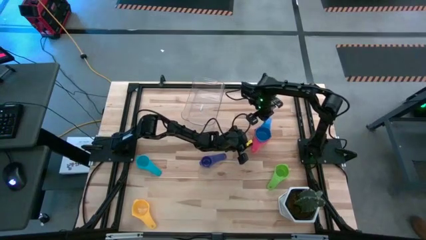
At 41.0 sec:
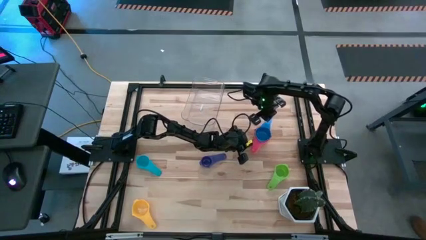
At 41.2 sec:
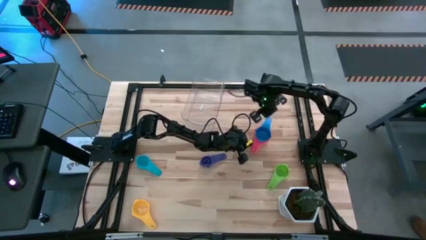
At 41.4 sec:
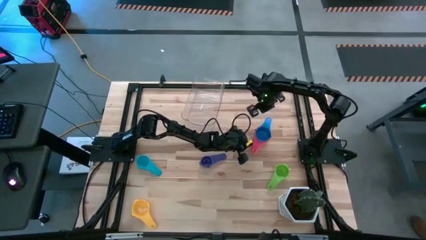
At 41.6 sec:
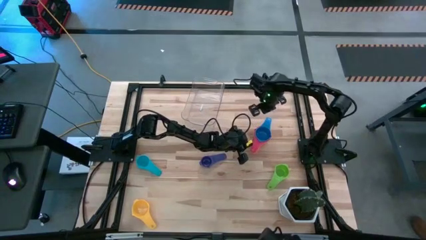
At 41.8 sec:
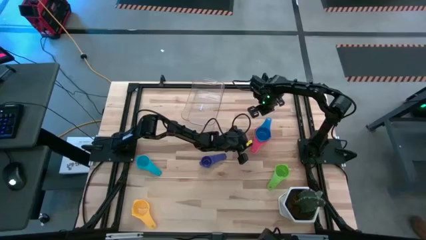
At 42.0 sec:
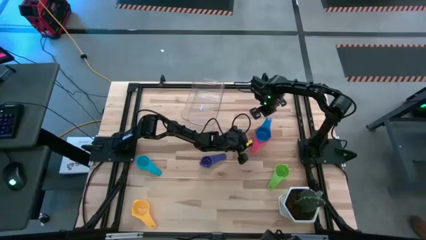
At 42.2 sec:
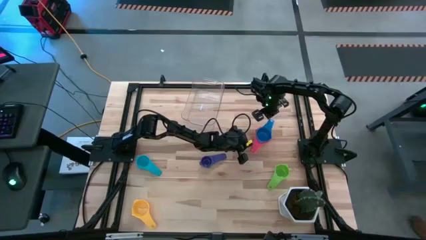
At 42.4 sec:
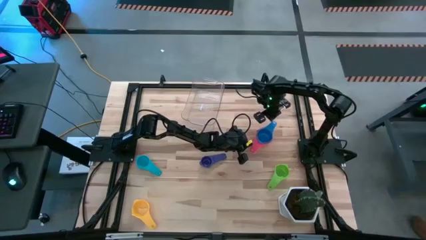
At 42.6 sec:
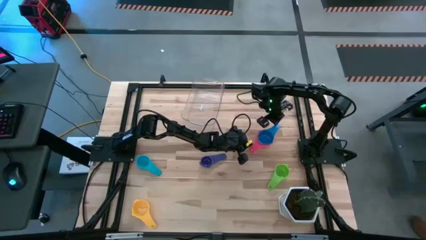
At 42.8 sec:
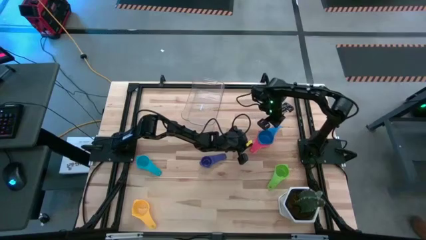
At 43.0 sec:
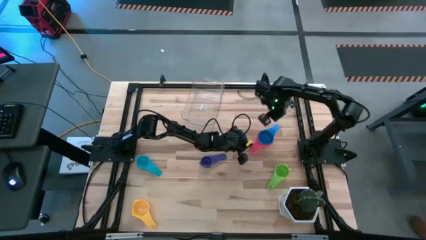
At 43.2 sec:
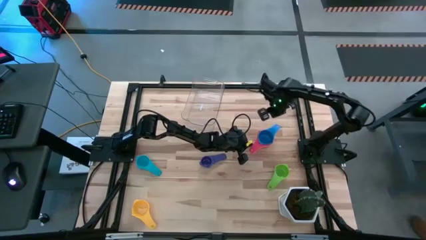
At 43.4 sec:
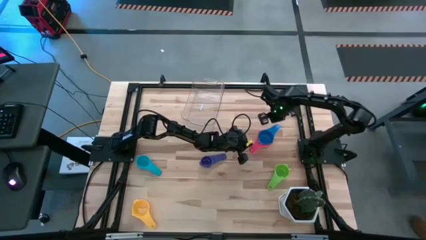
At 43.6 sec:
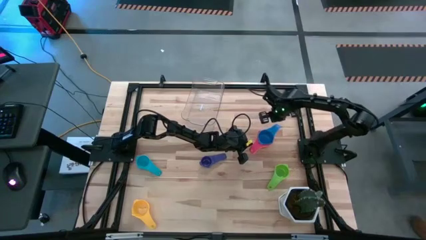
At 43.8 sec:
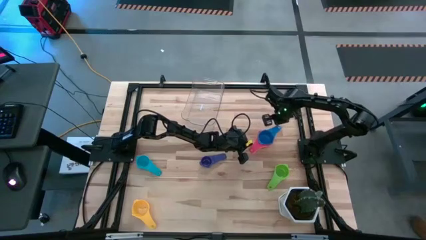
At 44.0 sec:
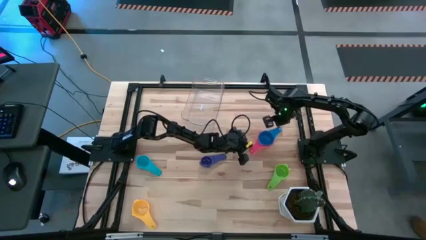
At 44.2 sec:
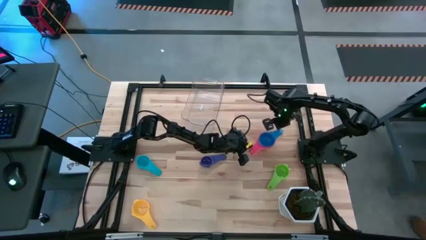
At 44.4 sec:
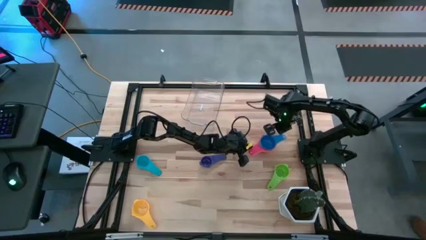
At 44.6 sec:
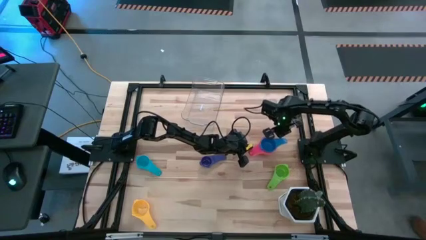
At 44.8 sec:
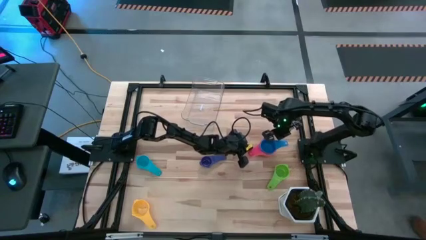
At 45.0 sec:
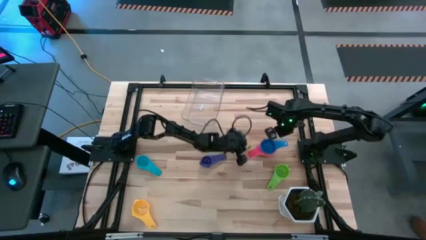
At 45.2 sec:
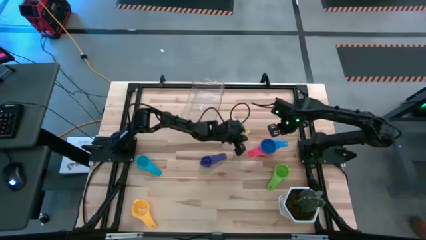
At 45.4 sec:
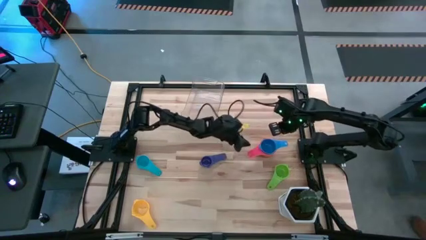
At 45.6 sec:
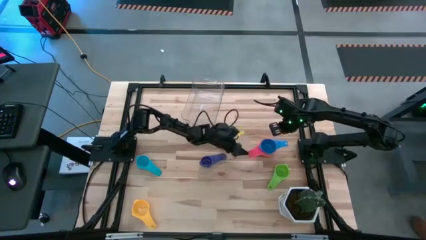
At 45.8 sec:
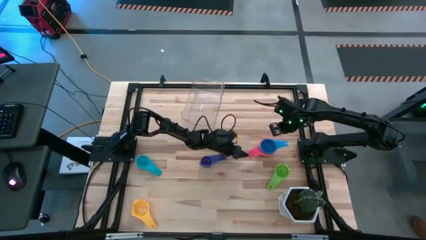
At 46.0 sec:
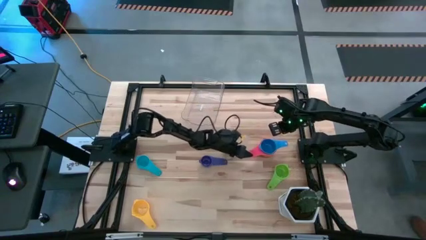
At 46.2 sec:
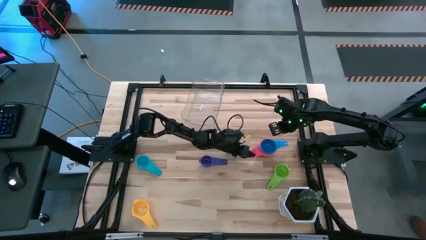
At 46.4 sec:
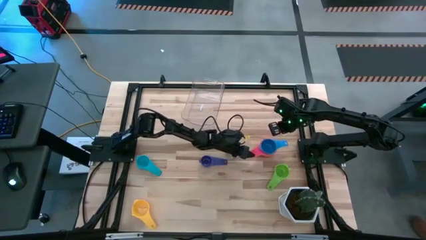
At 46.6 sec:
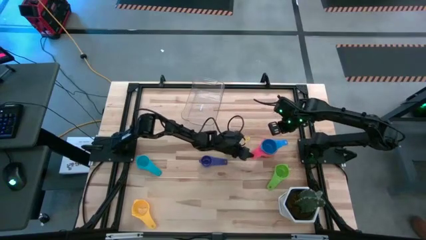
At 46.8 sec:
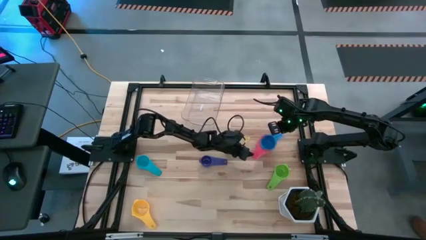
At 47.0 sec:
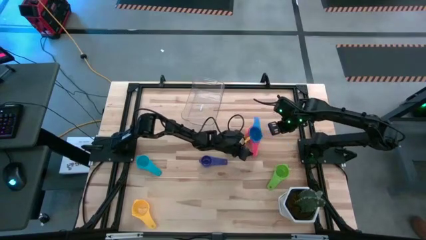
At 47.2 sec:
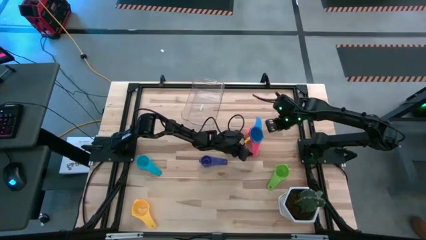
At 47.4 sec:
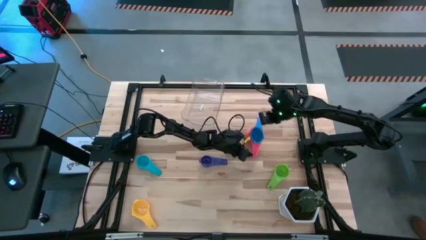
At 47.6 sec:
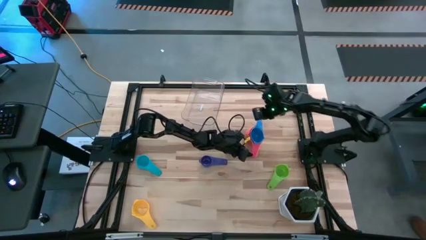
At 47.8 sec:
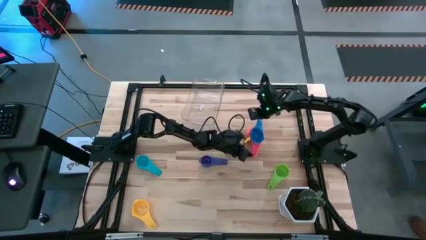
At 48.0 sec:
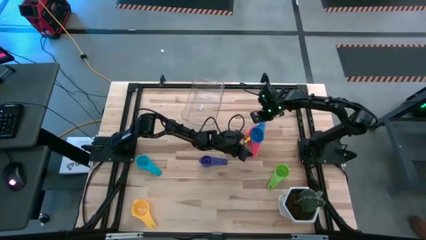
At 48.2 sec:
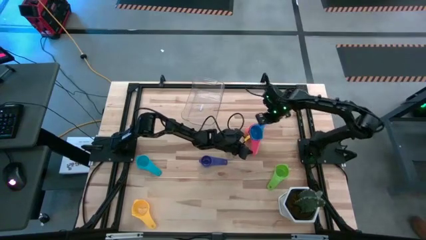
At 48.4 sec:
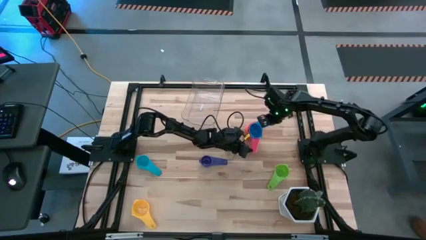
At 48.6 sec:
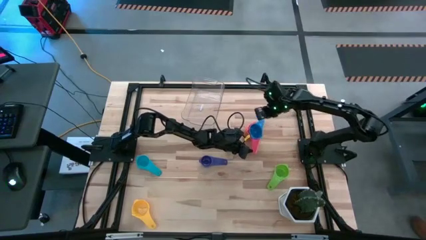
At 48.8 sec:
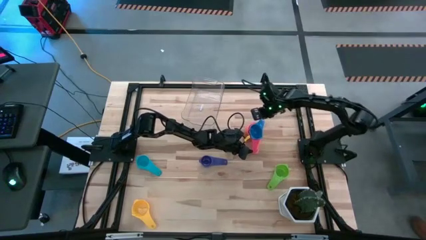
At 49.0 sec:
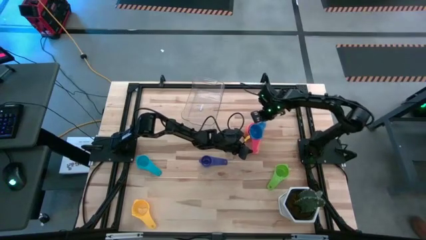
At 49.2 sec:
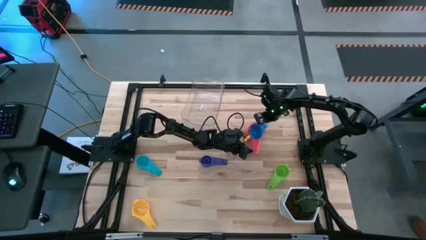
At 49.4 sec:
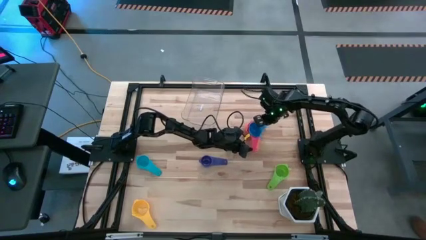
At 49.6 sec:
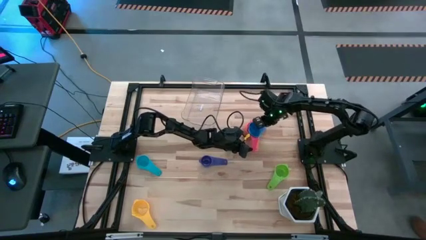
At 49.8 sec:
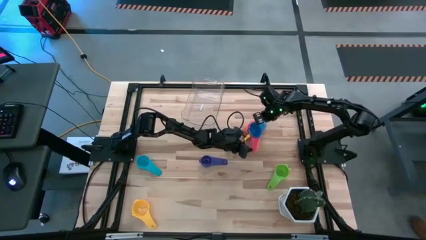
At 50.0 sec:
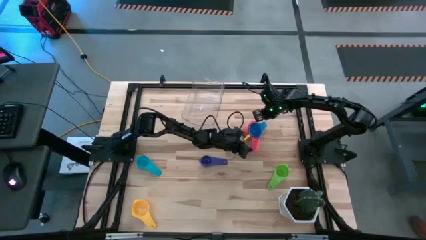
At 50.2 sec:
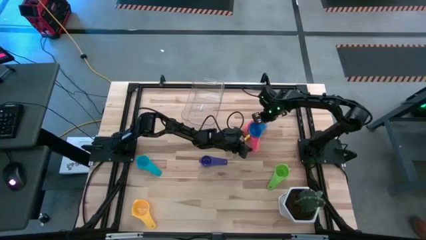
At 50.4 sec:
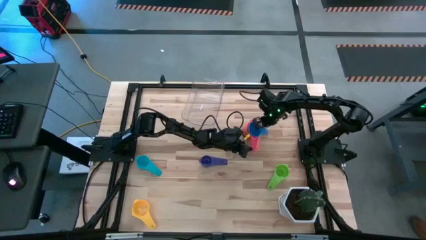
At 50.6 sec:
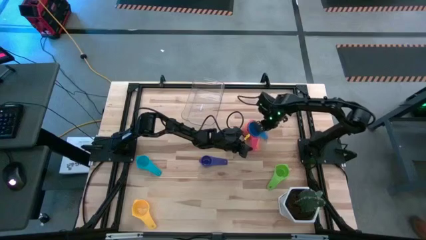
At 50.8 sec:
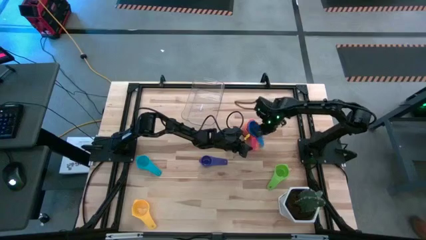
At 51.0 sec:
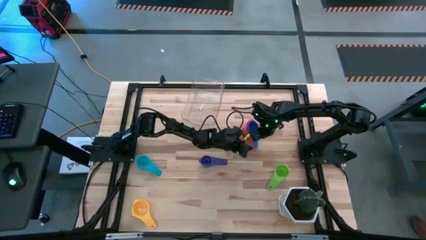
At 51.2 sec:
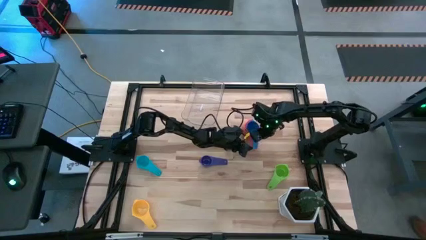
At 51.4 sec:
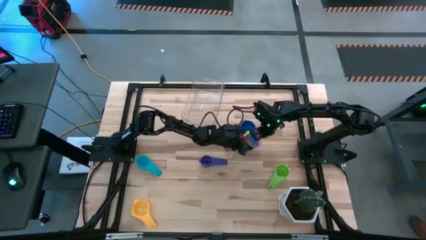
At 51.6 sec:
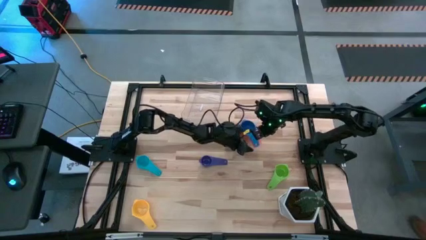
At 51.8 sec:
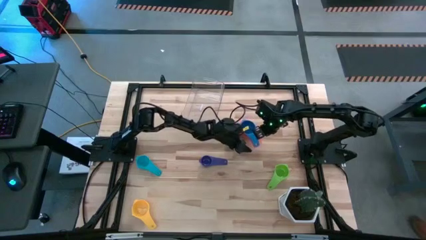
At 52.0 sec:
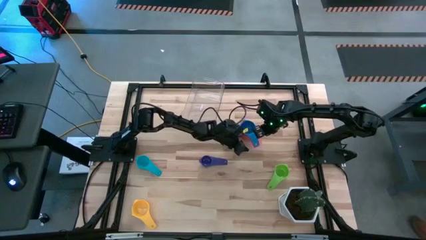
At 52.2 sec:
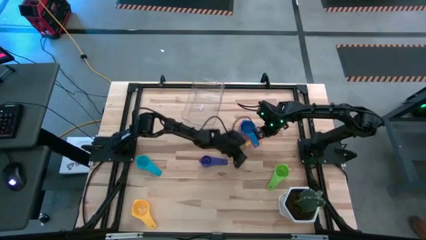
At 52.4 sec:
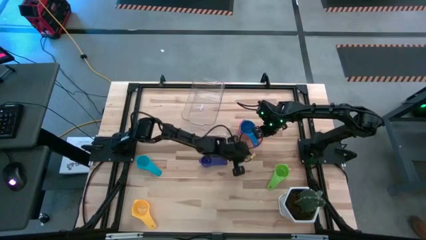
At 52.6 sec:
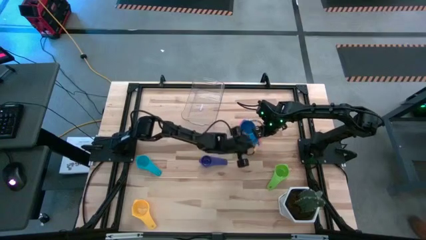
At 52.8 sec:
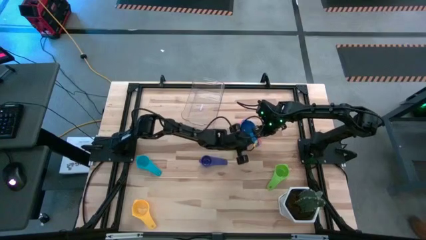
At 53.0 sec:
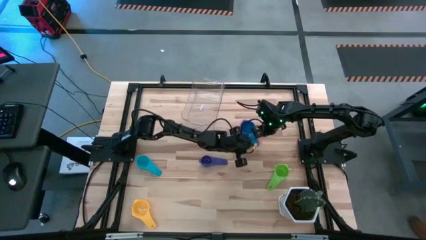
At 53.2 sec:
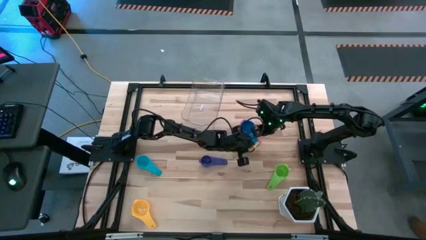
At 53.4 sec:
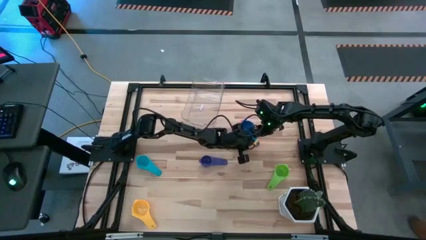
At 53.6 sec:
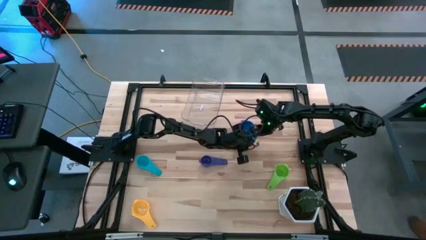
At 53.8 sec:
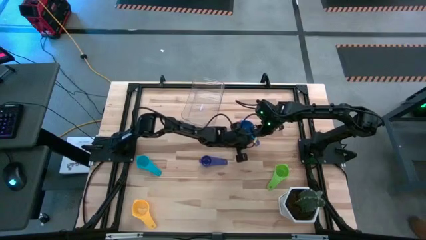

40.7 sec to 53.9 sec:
Task: Nest measuring cups in basket
Stack the blue measuring cup on top of the pink measuring cup
